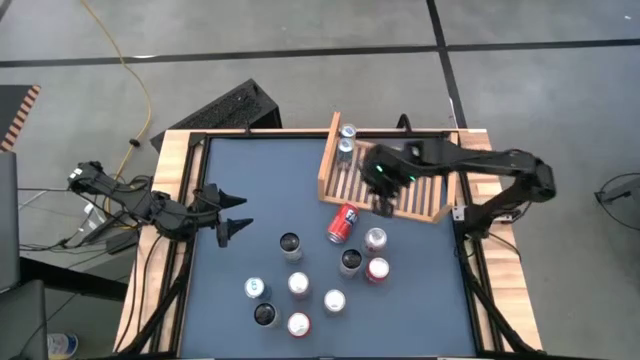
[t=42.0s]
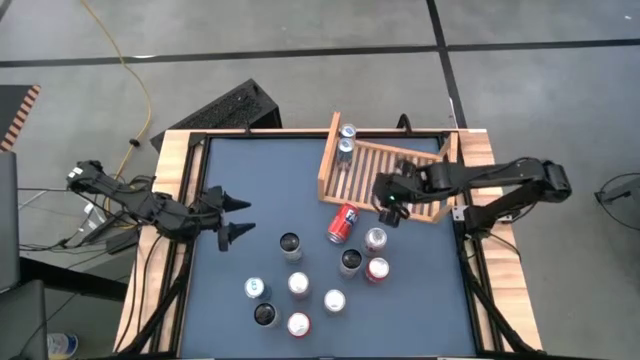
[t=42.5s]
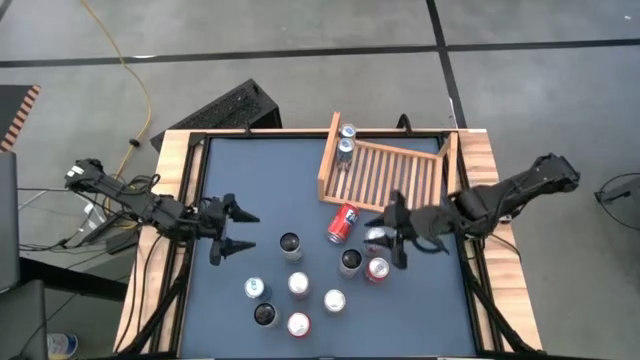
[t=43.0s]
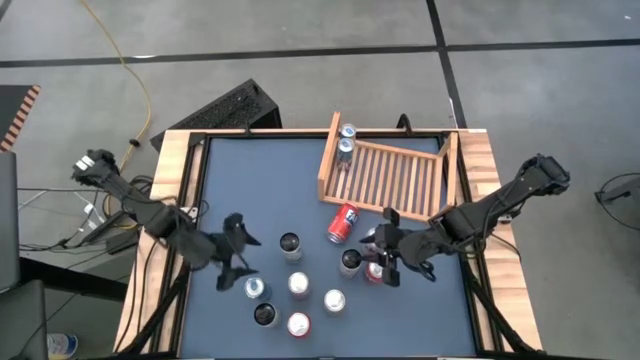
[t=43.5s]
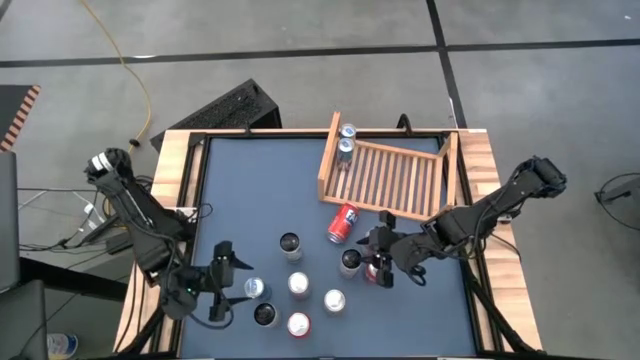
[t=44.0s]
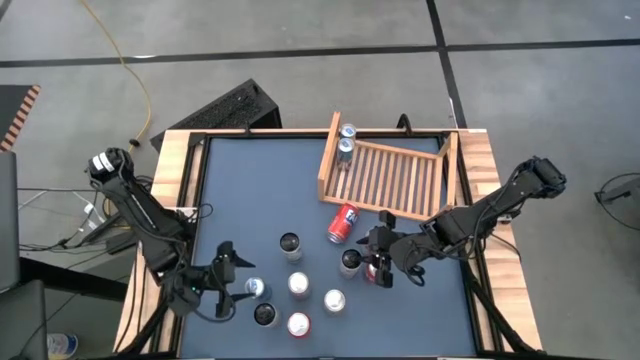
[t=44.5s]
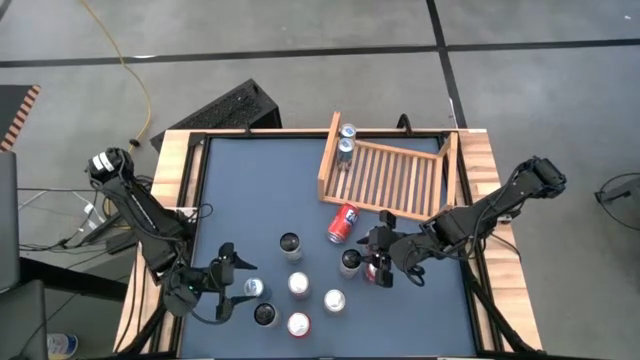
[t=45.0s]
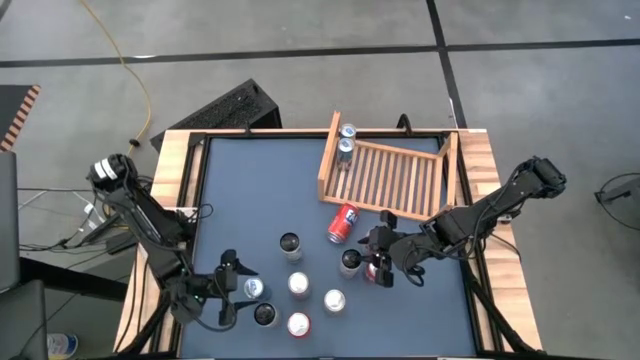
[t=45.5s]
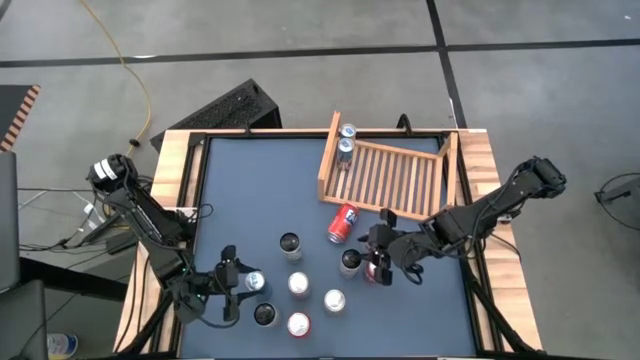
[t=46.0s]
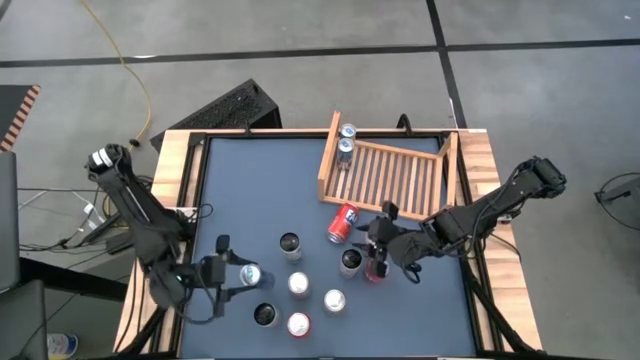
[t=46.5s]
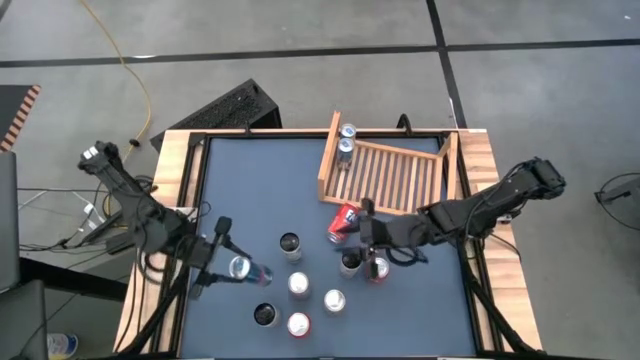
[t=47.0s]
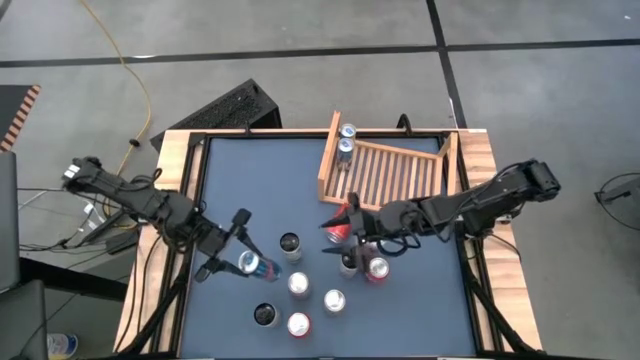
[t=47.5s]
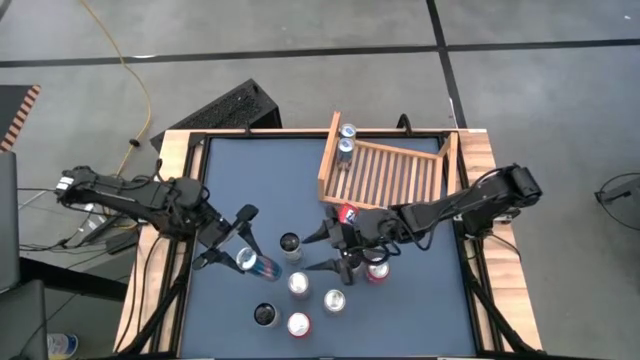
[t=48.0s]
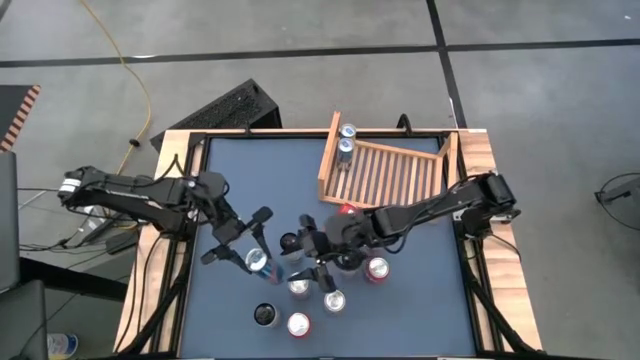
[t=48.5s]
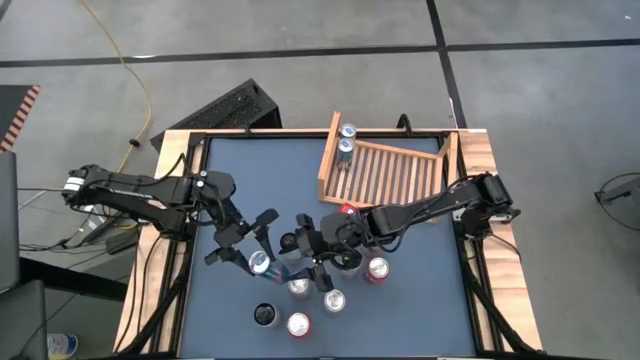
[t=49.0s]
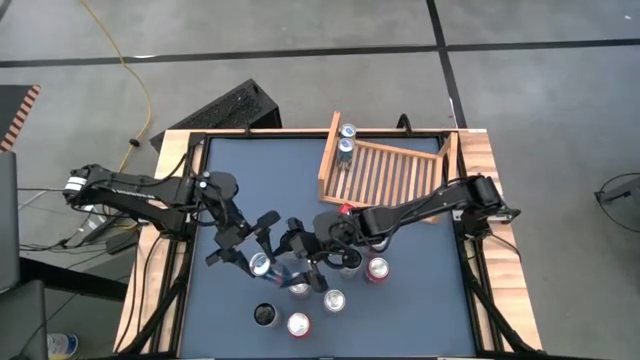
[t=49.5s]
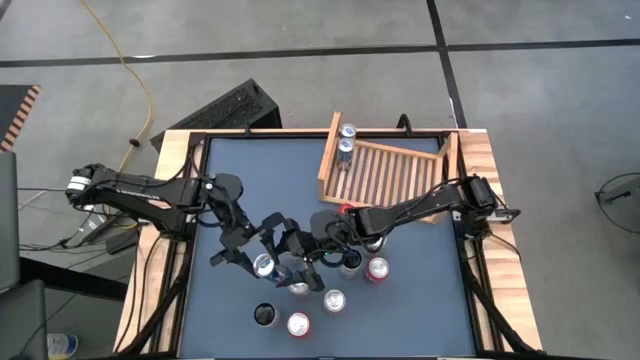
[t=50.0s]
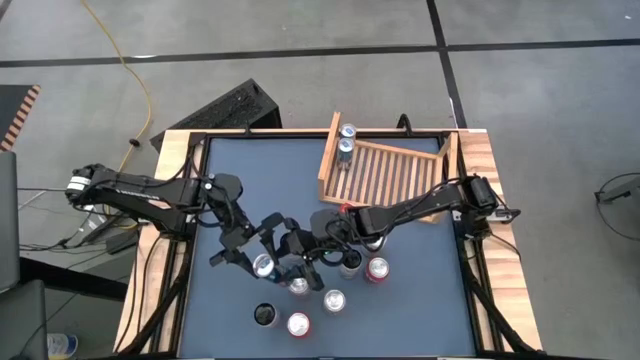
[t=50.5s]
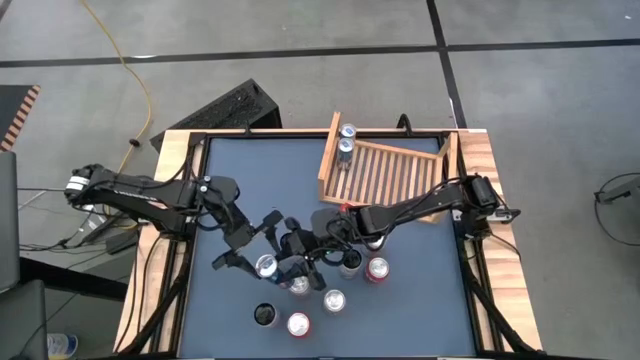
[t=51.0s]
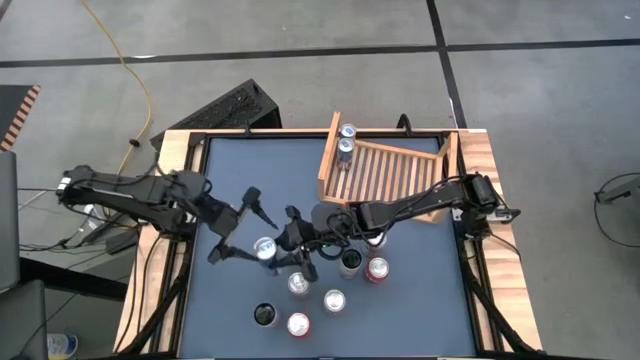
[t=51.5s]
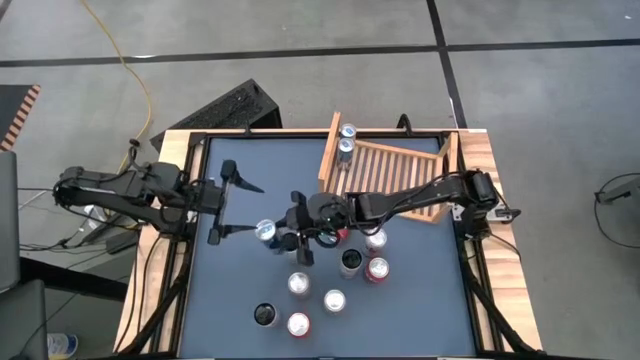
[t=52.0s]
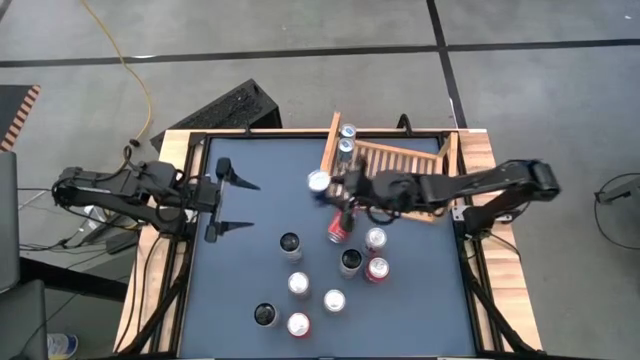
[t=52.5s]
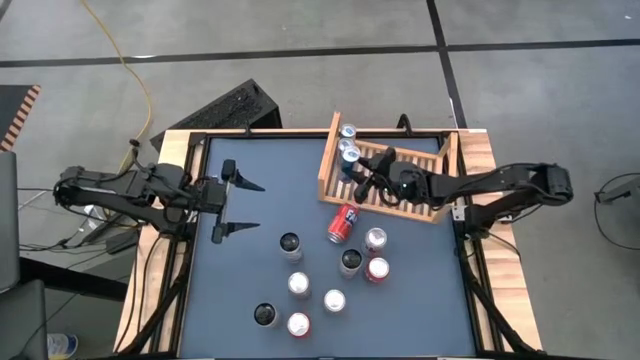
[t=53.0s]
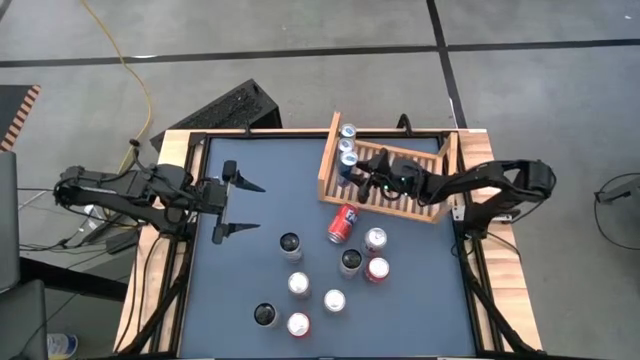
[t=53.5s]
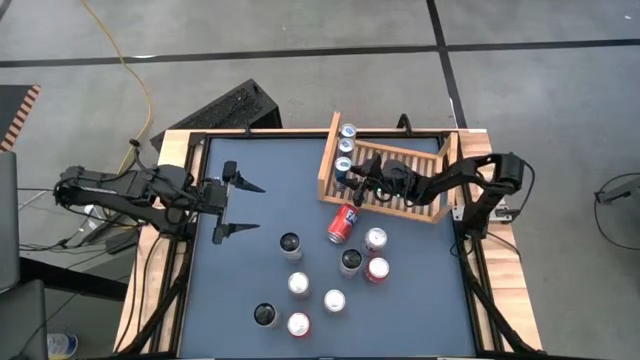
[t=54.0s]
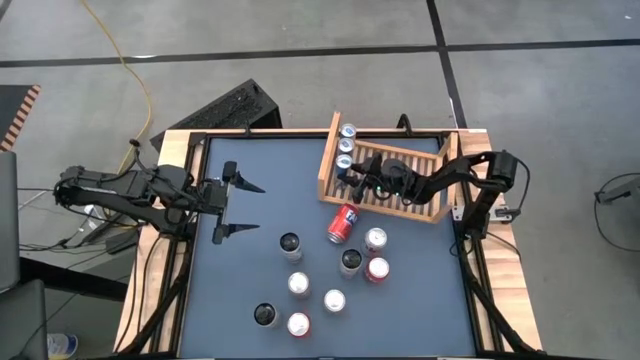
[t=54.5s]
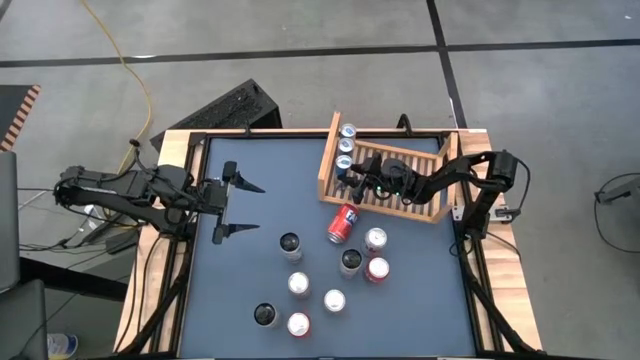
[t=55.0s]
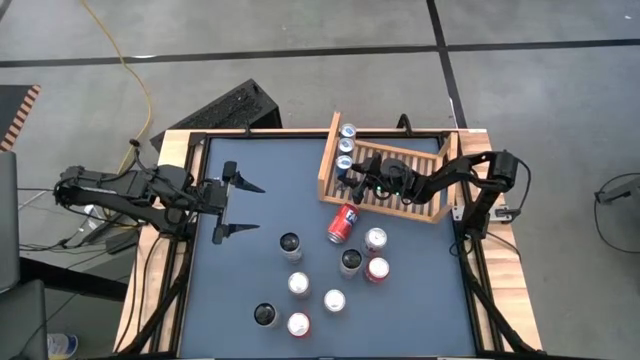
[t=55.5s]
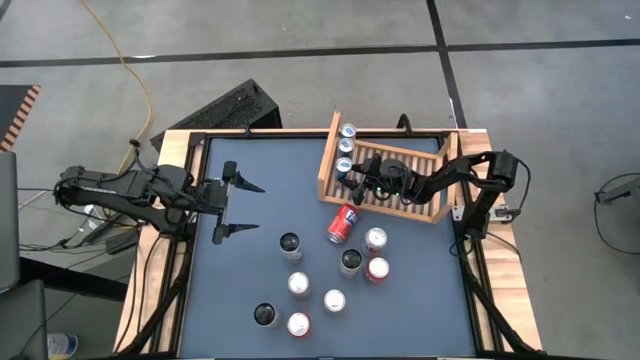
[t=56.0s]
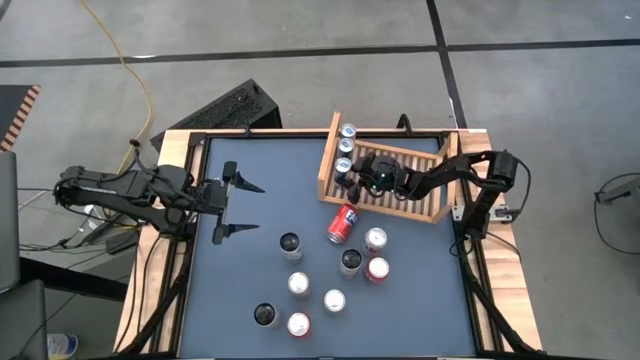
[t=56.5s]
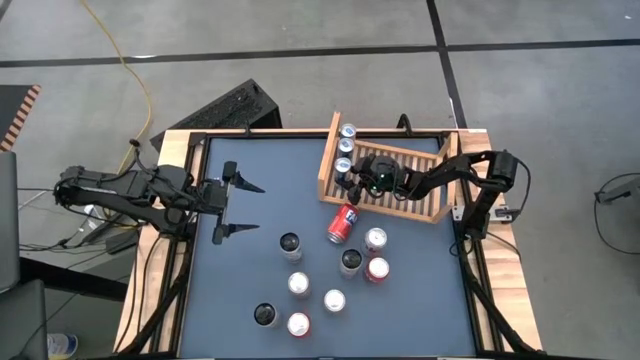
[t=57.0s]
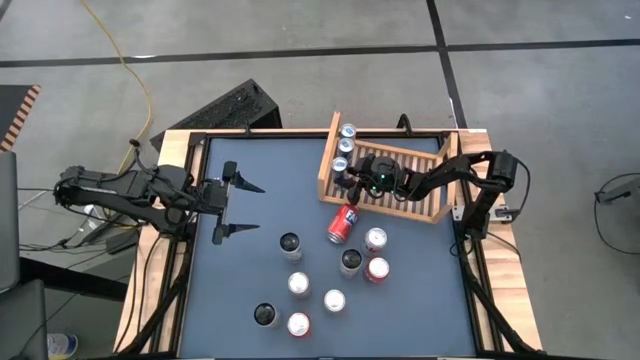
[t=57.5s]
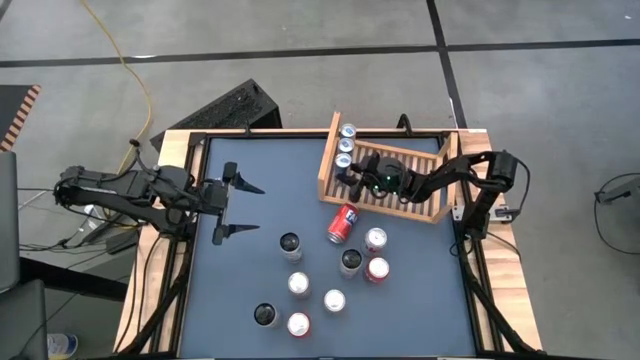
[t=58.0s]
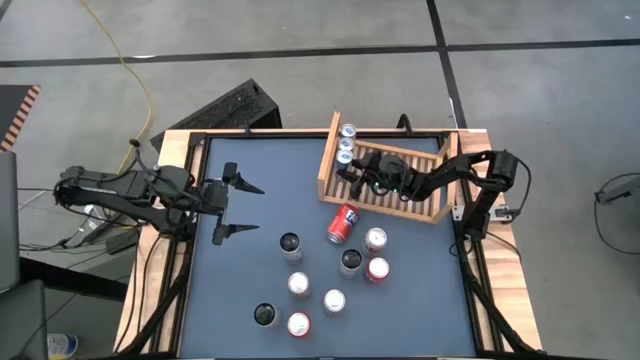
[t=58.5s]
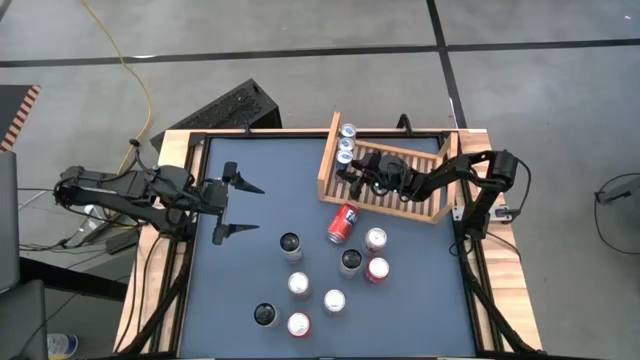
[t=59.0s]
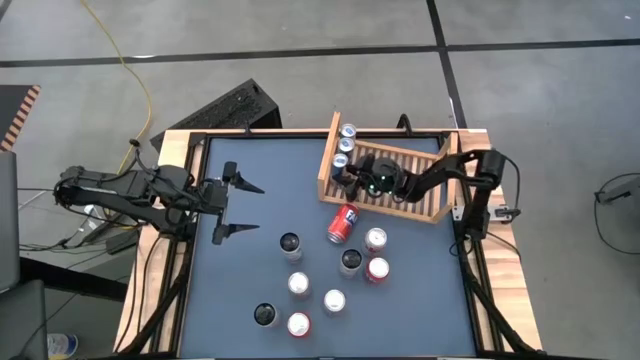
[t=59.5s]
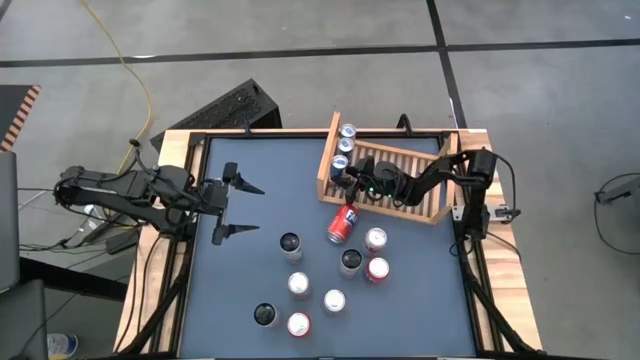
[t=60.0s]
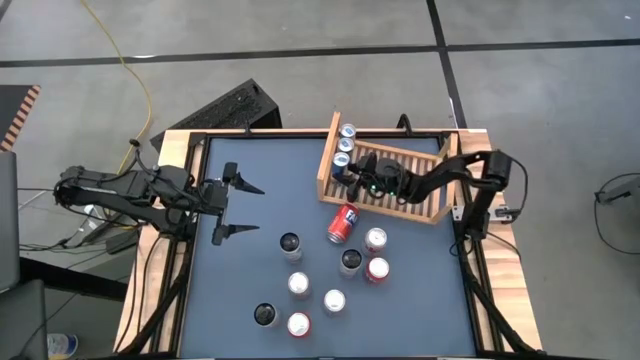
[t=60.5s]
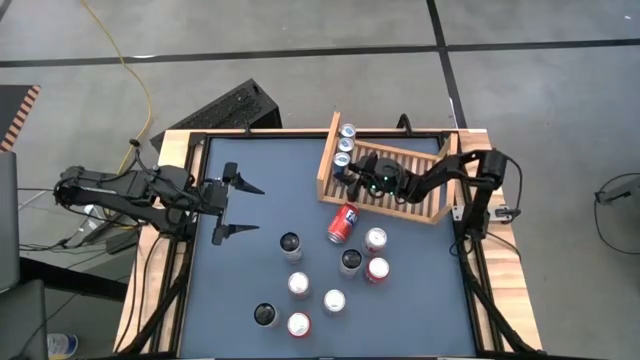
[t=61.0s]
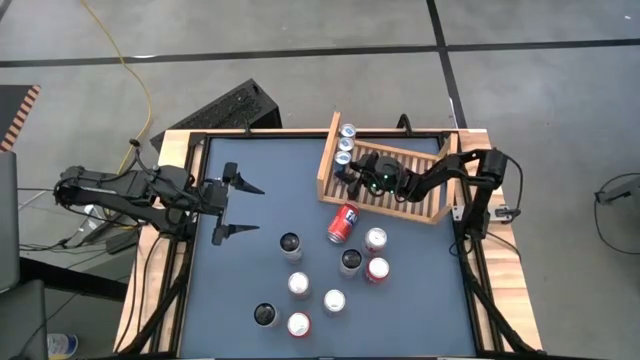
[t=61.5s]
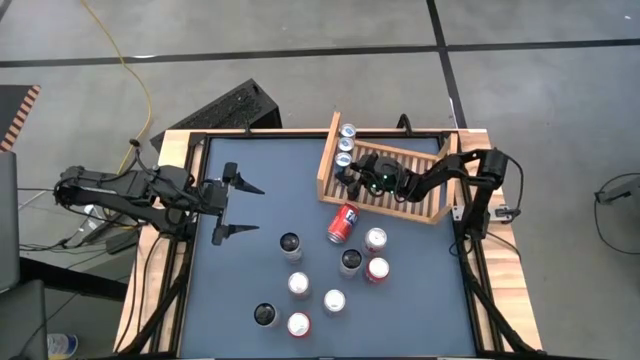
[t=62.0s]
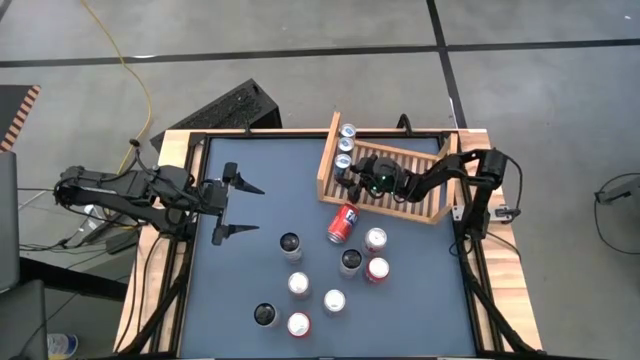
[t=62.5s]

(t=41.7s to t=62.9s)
Task: Place canned beverage on shelf
Put the blue soda can aligned with the other blue soda cans on the shelf
